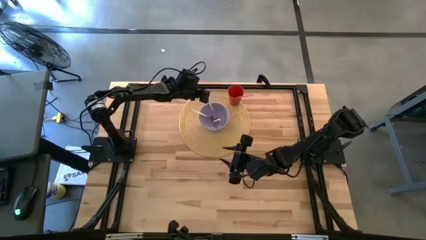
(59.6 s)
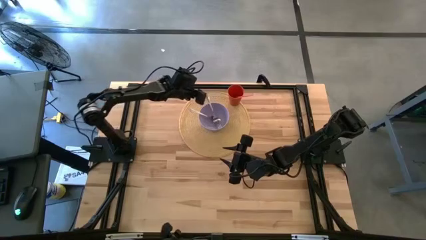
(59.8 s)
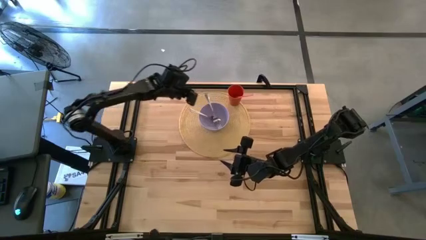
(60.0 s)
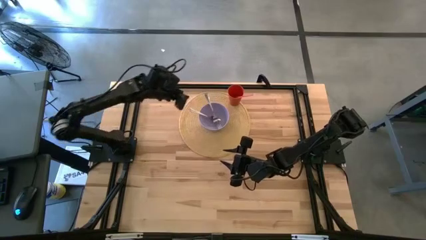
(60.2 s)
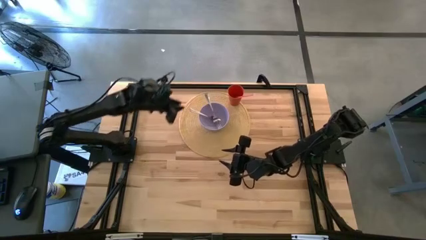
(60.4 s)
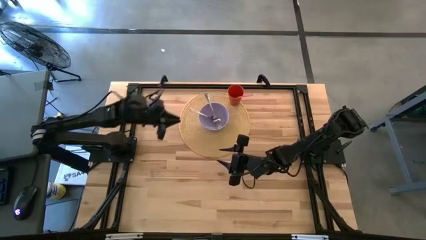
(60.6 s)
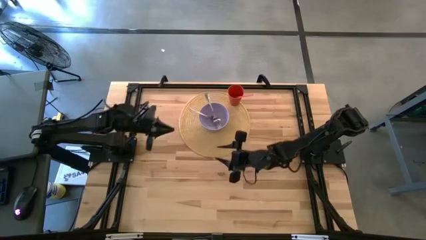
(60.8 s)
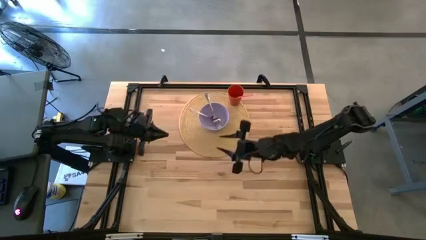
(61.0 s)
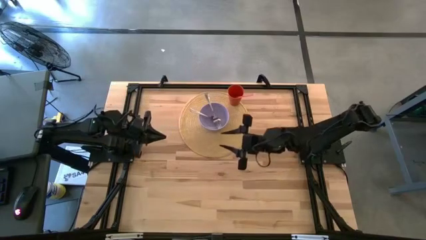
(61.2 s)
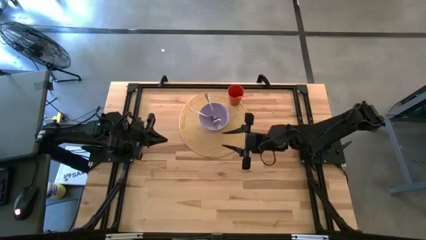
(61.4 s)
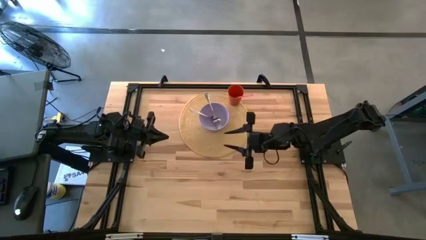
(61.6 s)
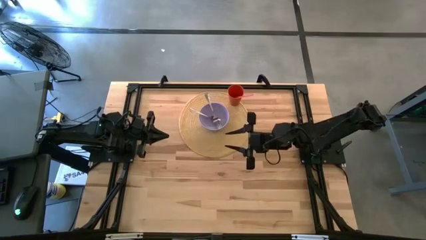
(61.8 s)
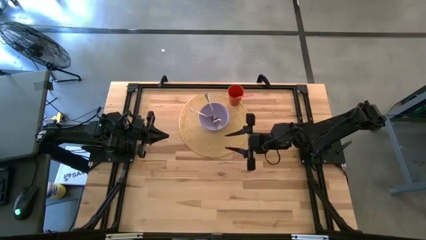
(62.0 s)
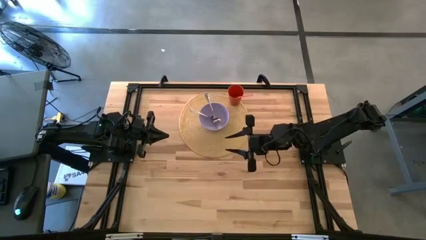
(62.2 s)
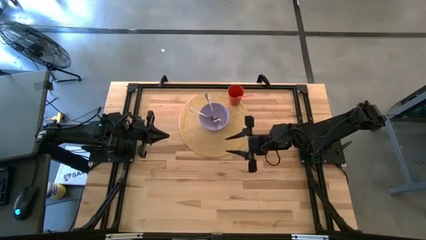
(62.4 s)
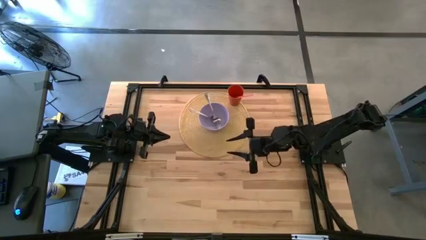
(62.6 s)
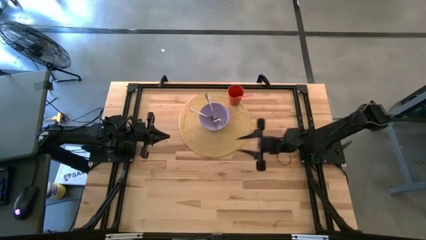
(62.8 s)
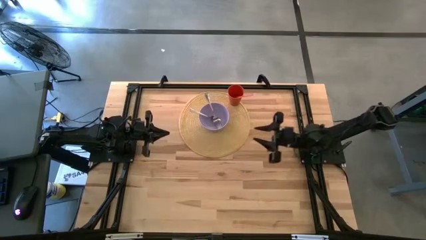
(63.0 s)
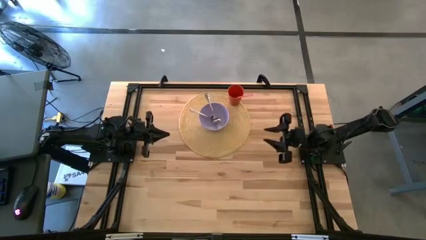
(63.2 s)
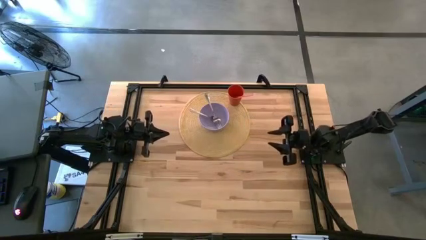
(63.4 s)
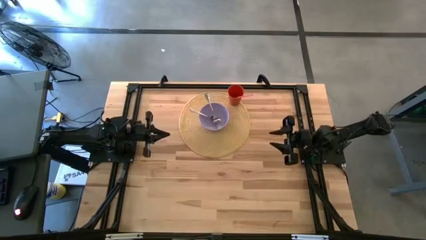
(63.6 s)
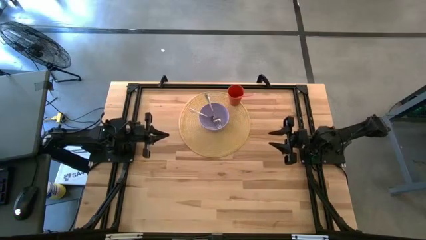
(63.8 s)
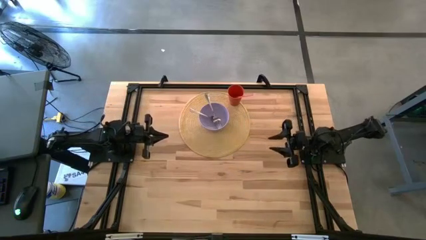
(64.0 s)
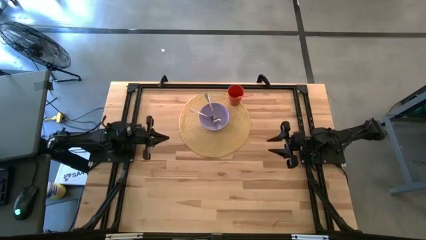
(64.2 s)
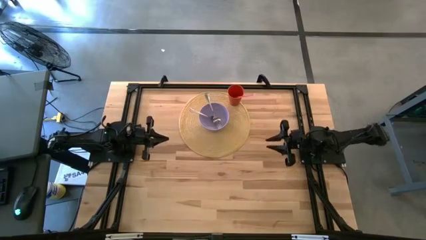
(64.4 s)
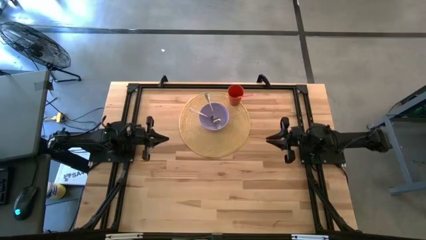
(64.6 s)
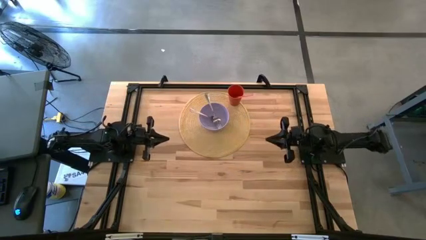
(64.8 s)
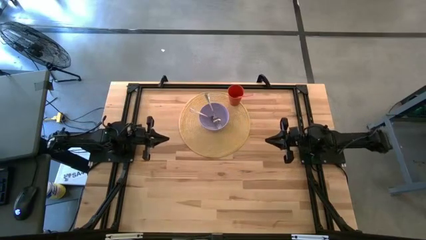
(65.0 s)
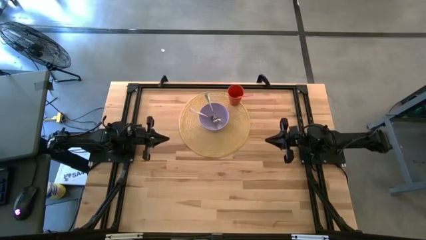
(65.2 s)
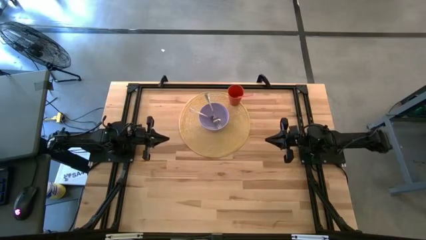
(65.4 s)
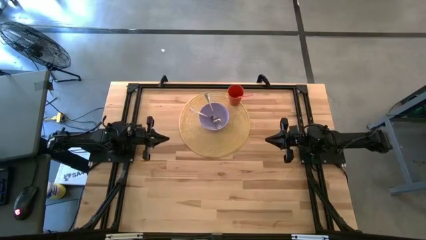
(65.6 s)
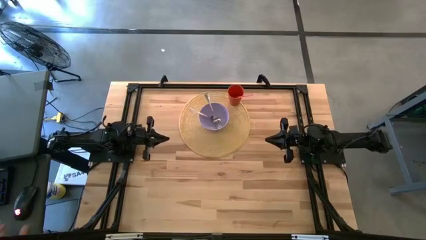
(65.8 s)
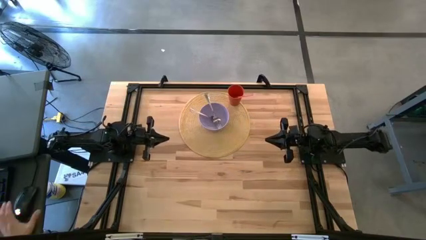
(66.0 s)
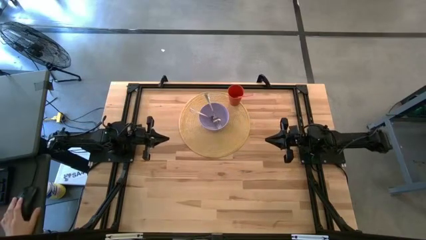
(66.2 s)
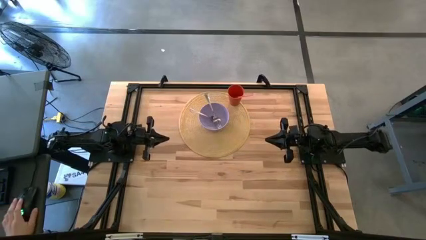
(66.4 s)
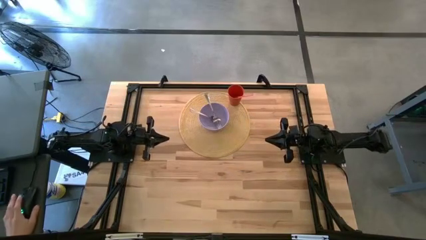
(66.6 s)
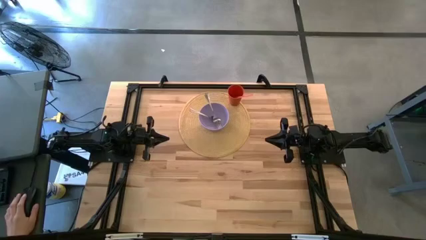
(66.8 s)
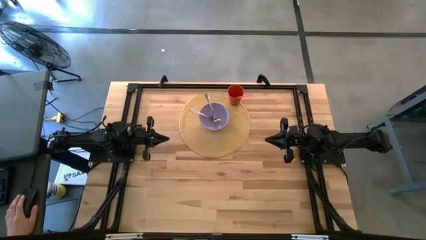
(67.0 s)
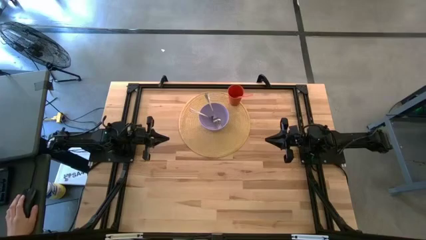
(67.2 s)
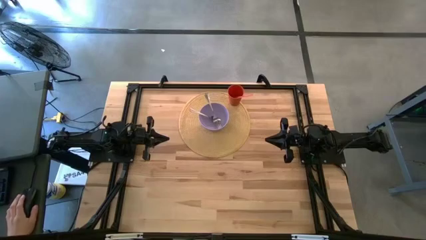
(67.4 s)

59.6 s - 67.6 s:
Task: Pick & Place Utensil
Return to Home Position

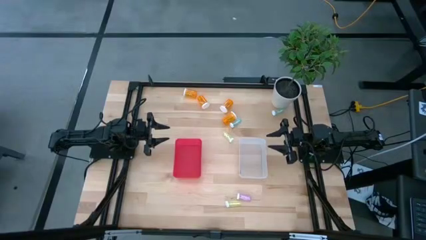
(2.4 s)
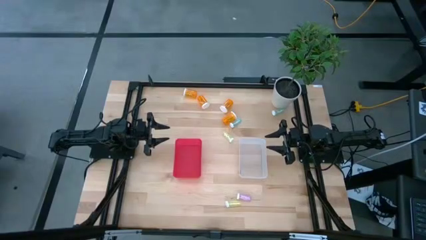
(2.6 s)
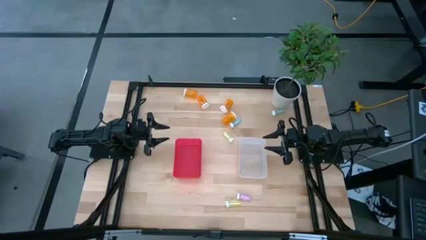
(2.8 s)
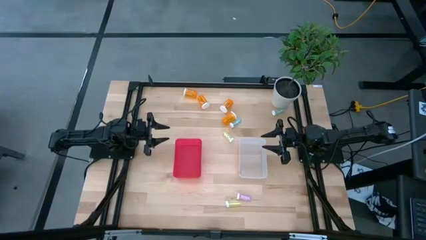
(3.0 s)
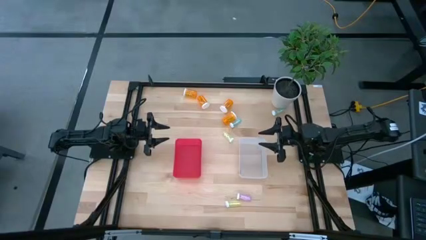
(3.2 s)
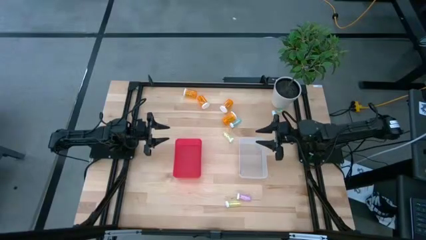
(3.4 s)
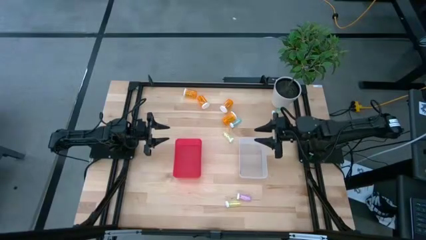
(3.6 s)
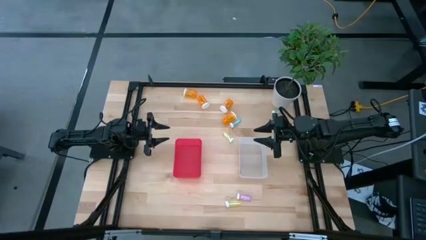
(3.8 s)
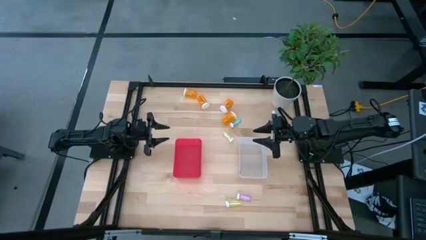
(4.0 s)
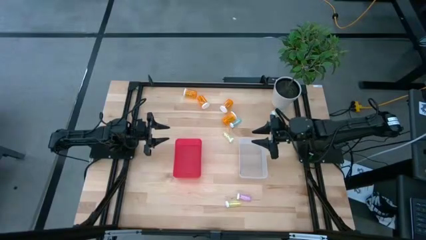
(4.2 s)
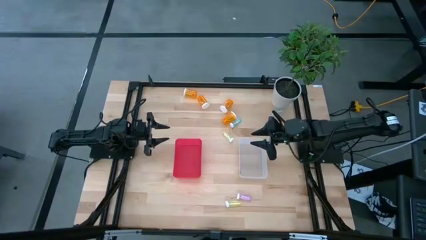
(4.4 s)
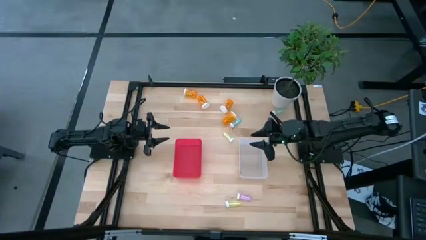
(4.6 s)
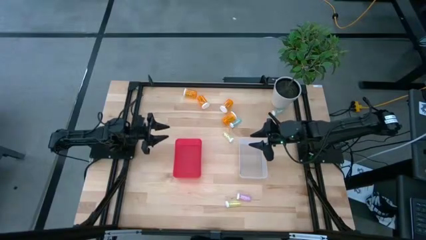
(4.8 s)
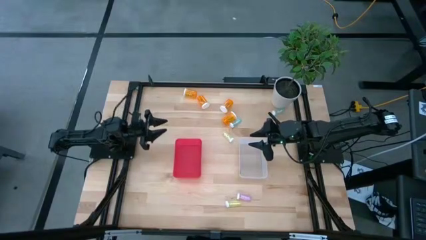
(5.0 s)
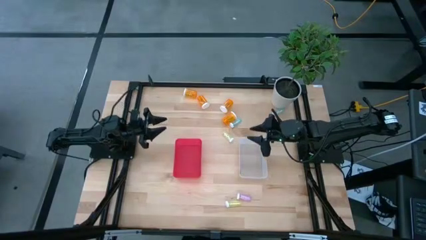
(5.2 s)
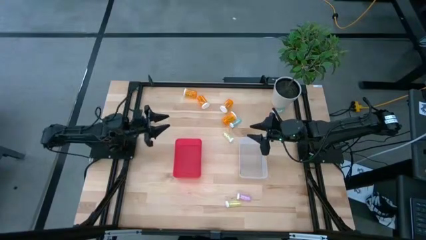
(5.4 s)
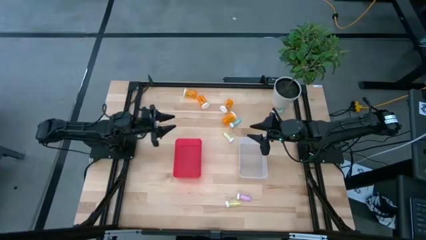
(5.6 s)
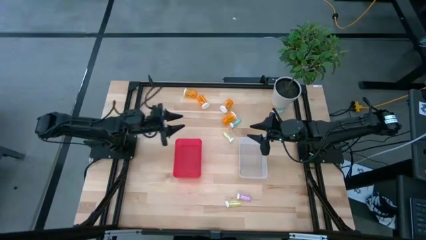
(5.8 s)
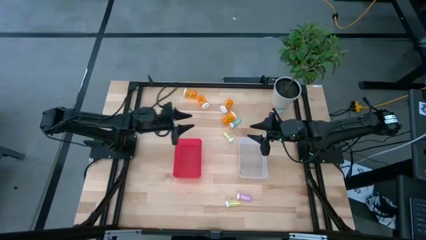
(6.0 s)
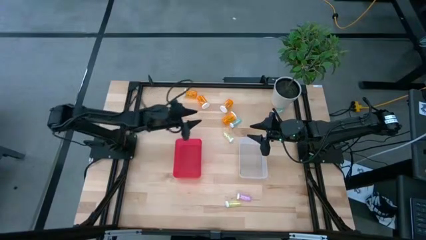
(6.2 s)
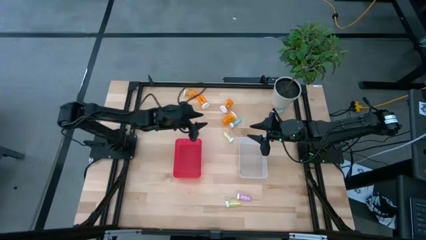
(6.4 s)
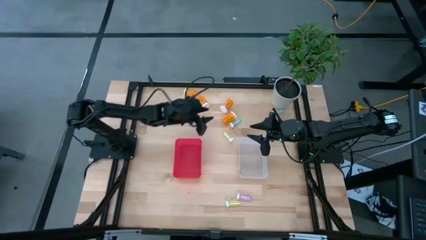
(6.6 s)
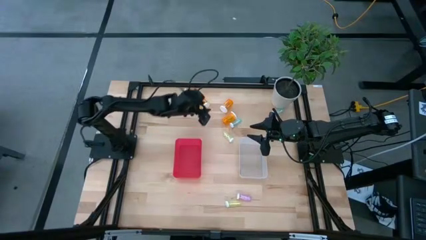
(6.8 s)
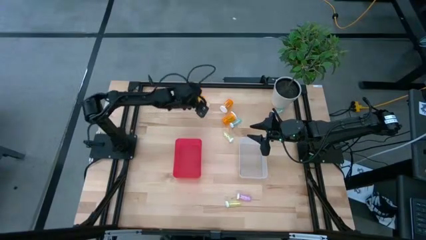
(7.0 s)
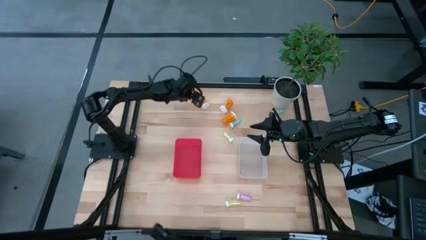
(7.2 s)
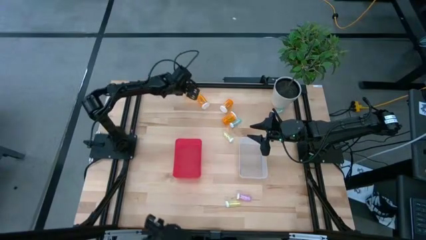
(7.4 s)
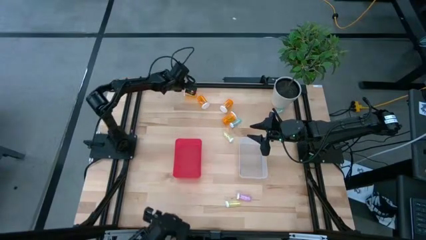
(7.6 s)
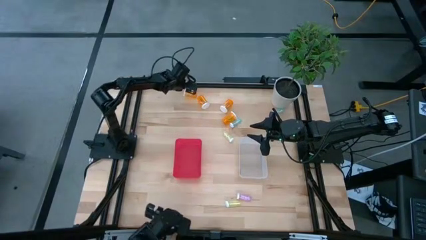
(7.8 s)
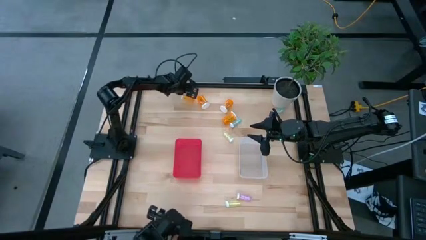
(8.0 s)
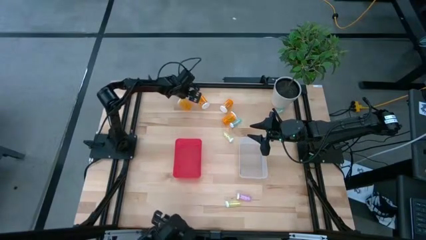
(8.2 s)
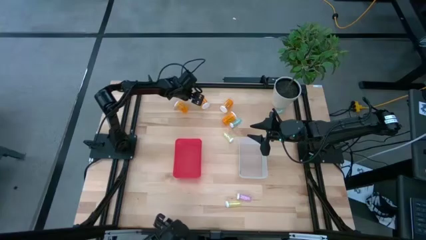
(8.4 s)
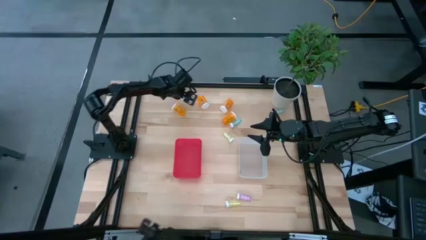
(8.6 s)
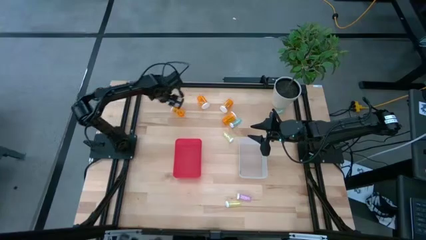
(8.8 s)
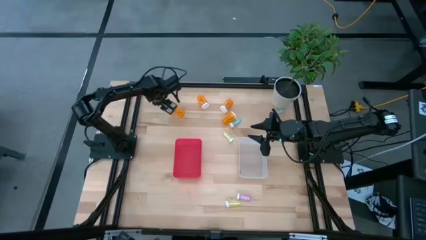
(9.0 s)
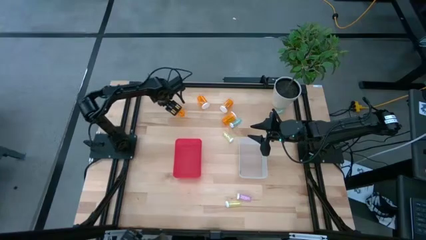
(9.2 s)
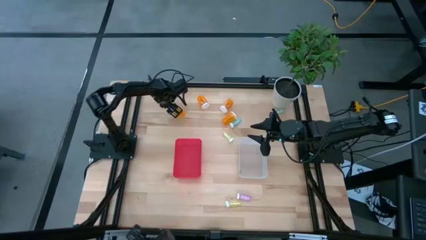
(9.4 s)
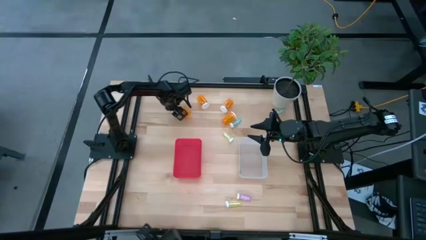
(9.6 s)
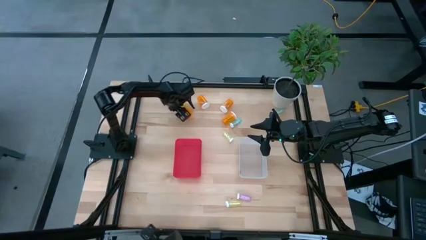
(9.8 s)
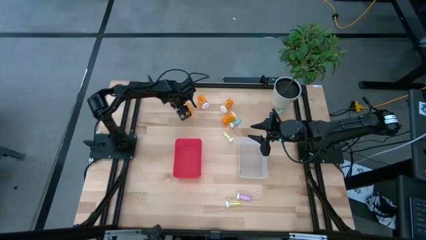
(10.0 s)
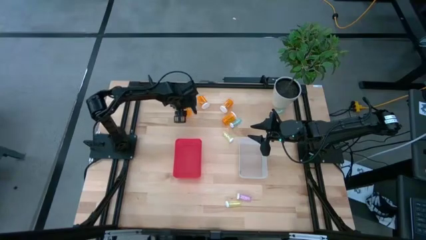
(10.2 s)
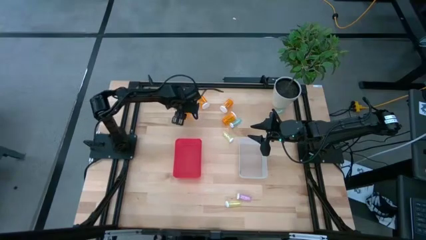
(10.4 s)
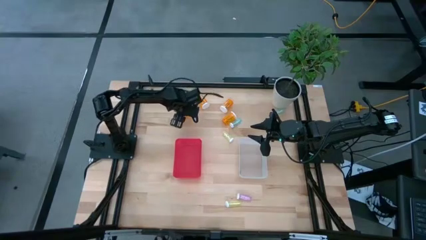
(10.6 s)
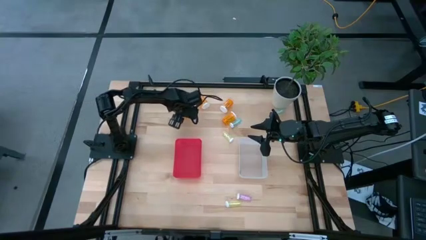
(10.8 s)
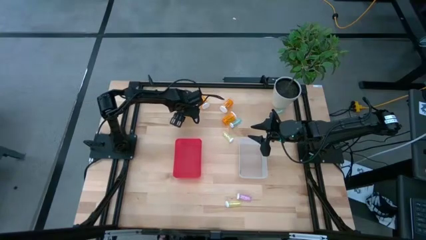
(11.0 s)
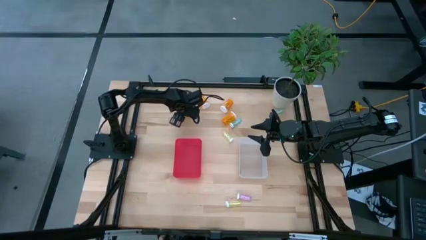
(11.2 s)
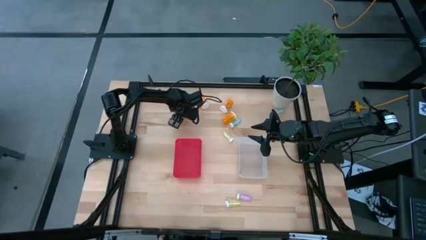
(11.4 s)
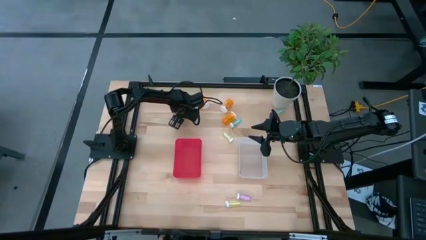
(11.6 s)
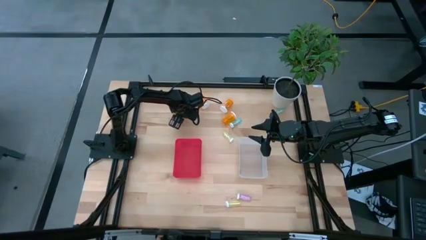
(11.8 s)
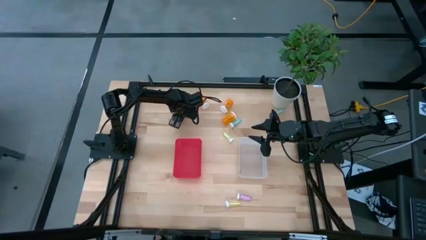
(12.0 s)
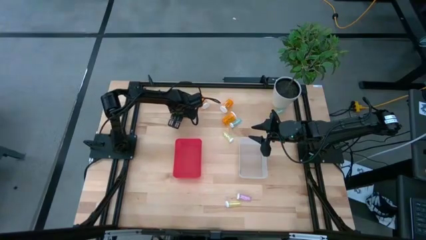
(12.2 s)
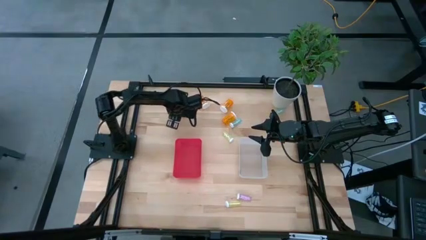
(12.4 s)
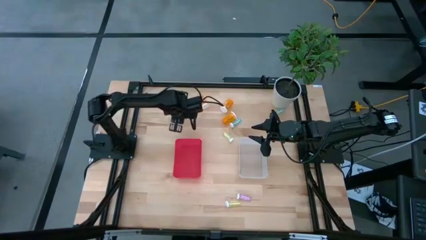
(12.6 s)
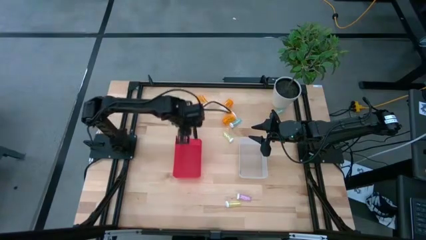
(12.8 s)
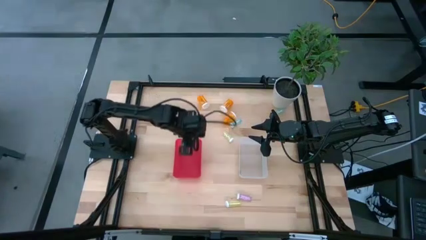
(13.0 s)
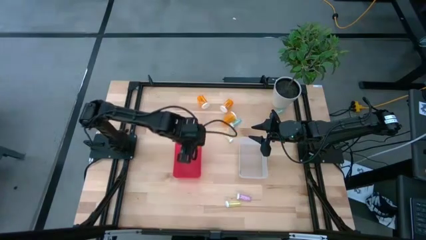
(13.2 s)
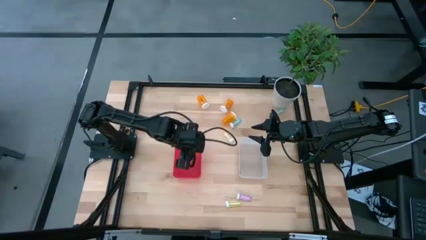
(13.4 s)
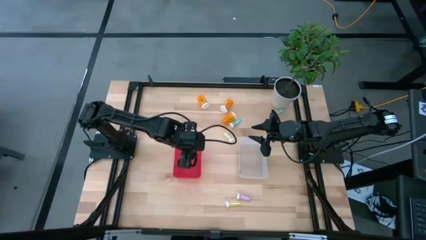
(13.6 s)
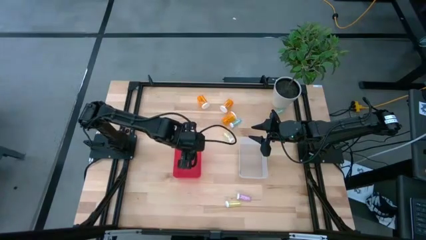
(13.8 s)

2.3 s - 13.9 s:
Task: Pick and place medicine bottles into bin by pill shape (circle, oval)
Put the large orange pill bottle into the red bin
